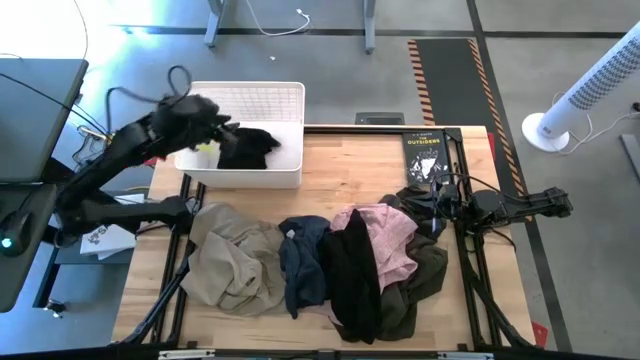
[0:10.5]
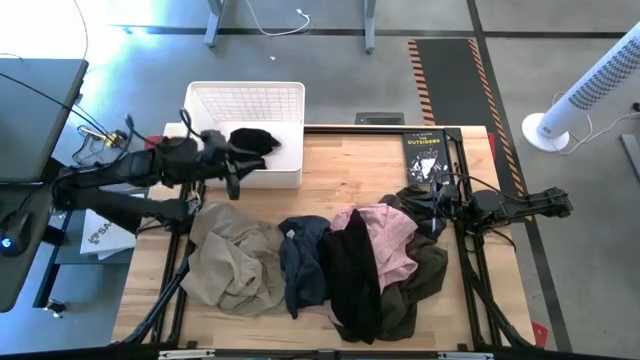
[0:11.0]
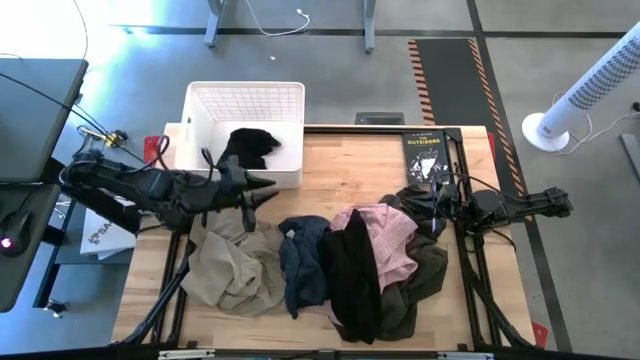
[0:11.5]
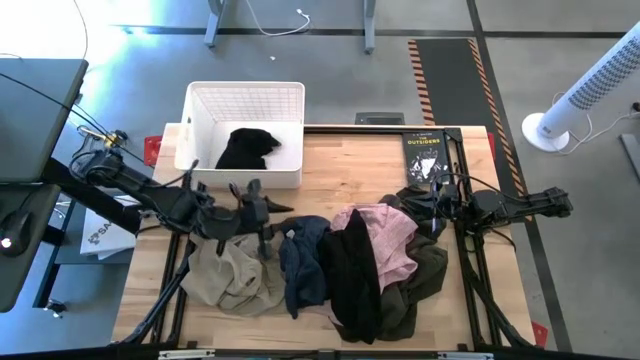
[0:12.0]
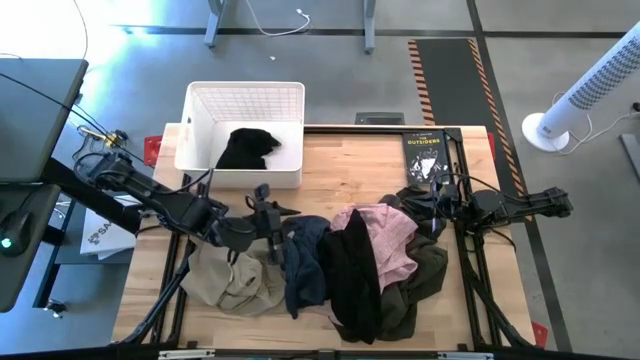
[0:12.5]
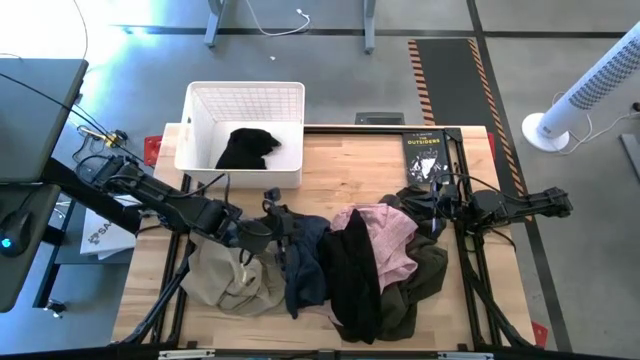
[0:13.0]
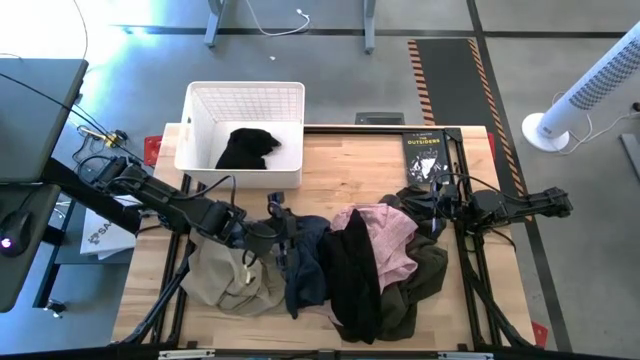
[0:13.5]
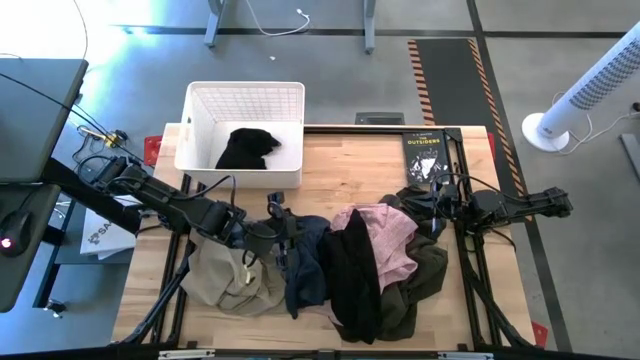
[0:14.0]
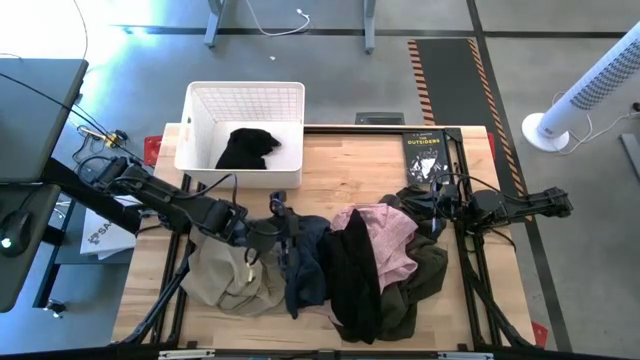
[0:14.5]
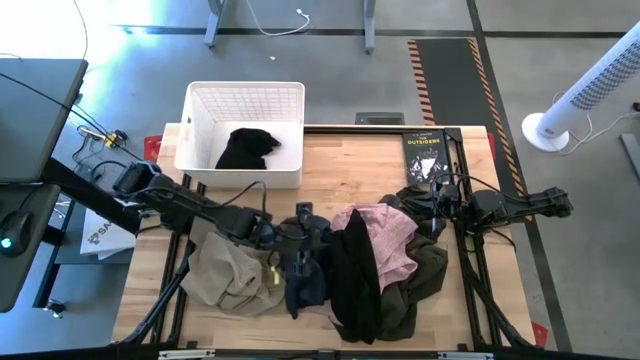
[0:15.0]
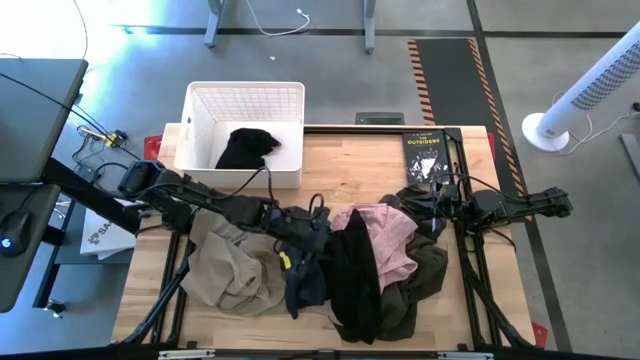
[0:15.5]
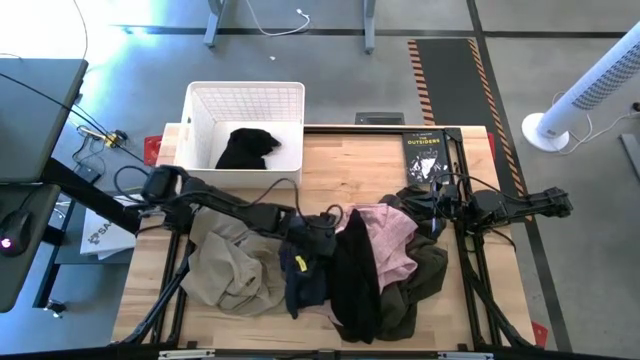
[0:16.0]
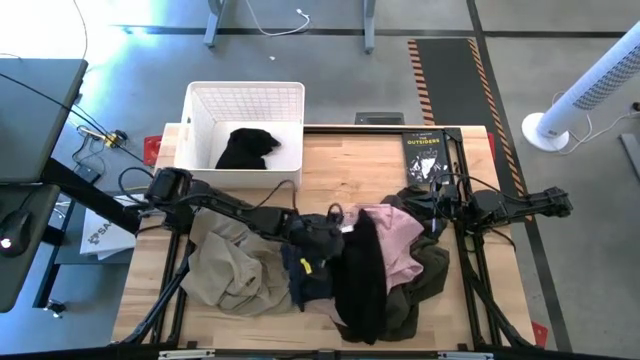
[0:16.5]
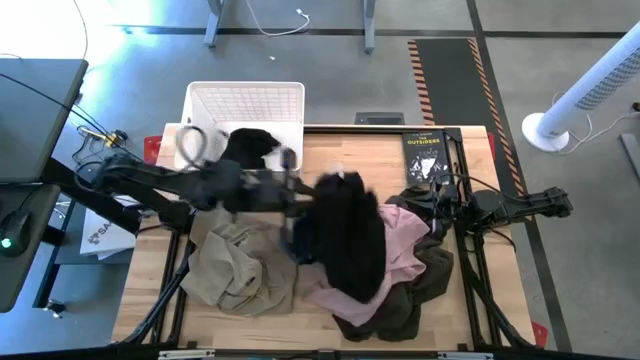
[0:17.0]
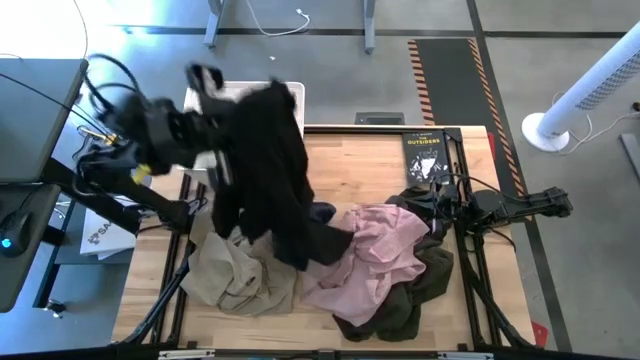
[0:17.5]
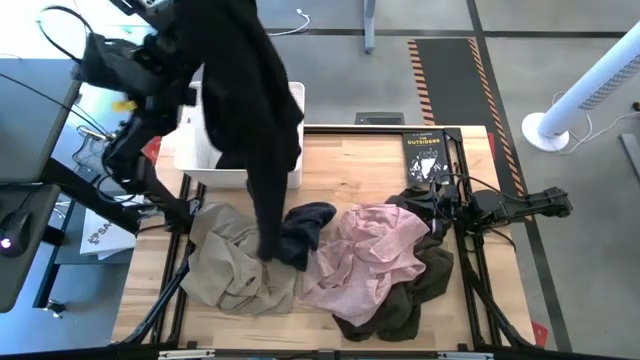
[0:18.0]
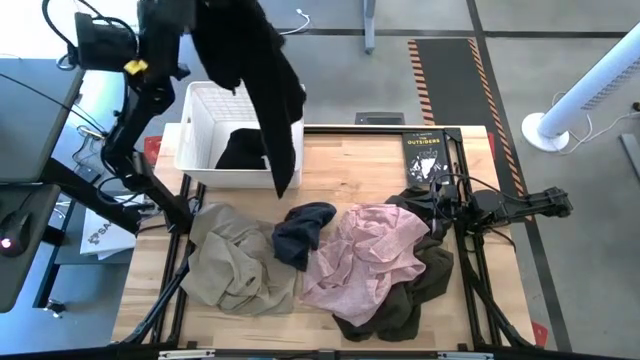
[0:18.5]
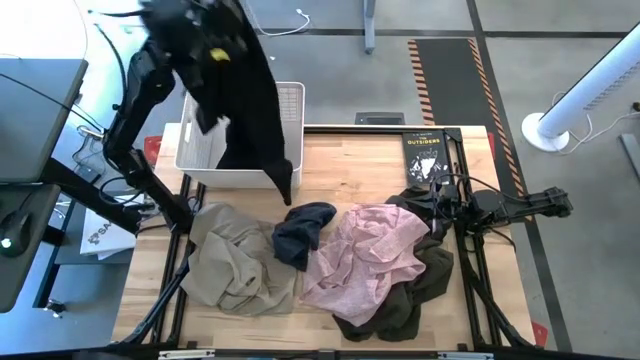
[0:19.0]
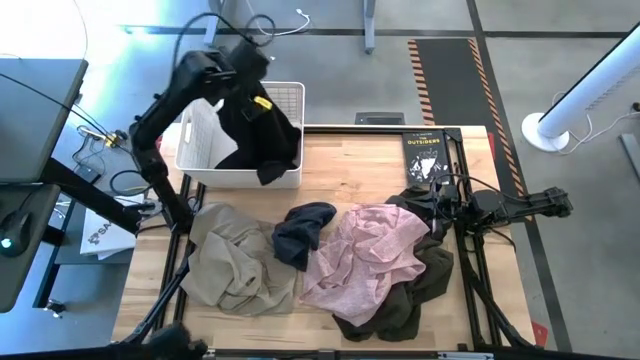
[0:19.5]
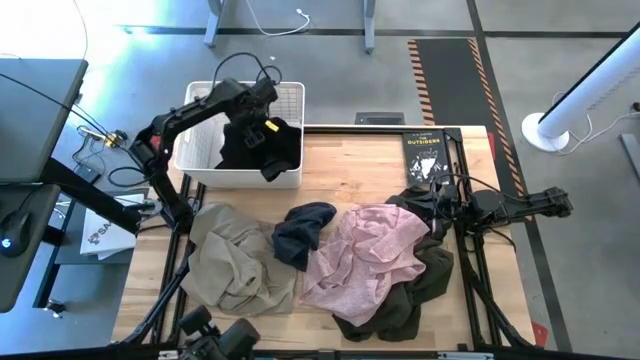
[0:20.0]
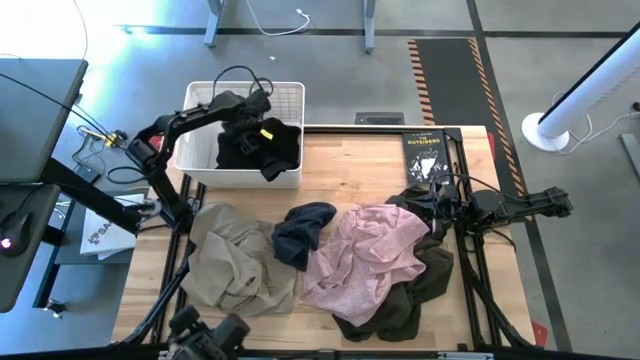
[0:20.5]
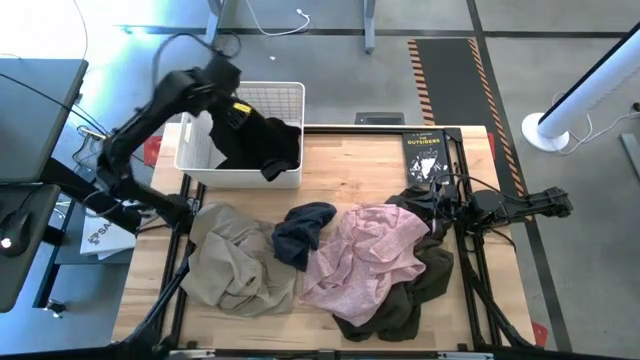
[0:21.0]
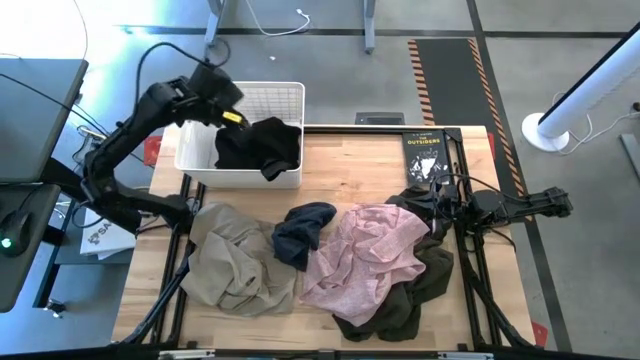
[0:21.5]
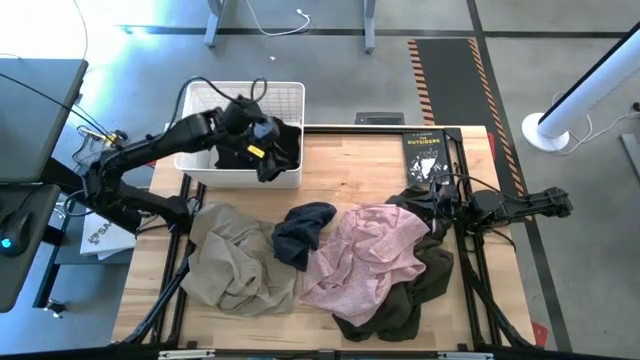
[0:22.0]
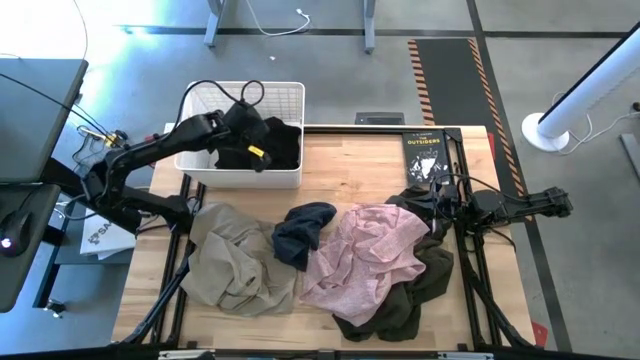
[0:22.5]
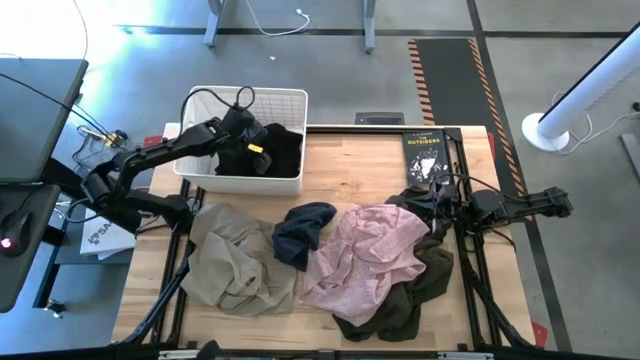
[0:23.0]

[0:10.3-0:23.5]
Task: Sort clothes
Put the black shirt into the laundry bin

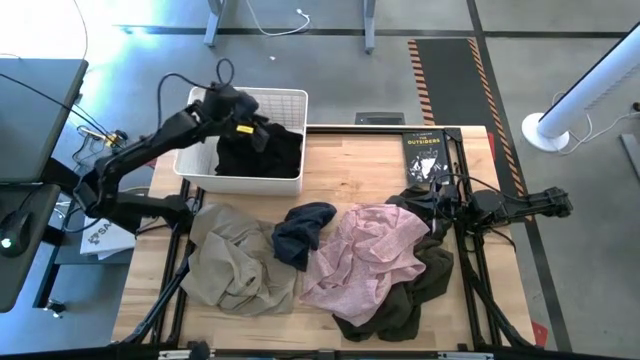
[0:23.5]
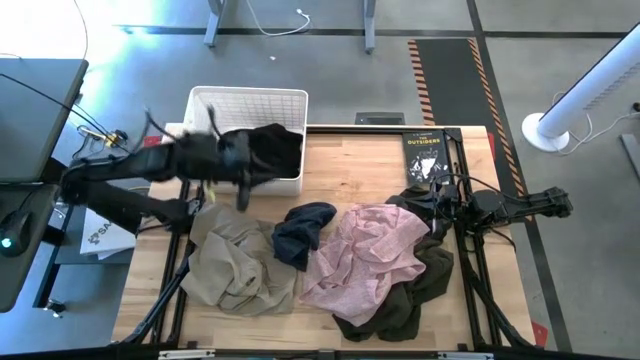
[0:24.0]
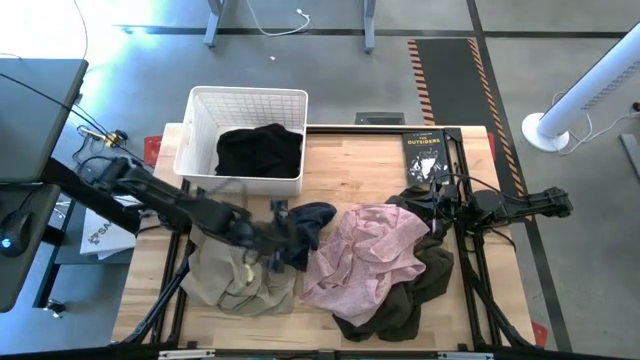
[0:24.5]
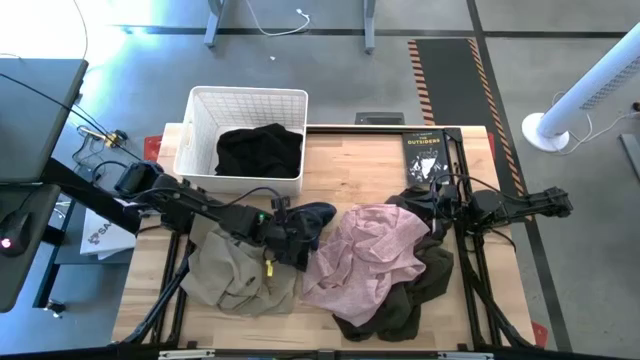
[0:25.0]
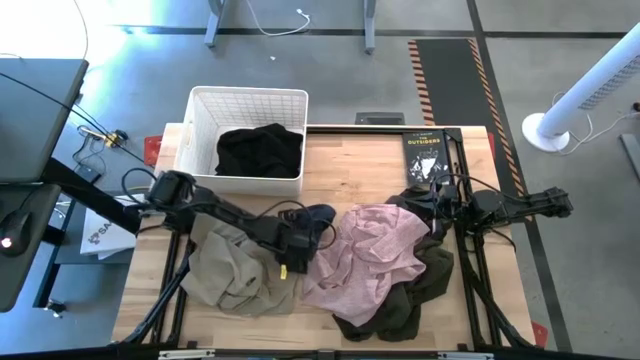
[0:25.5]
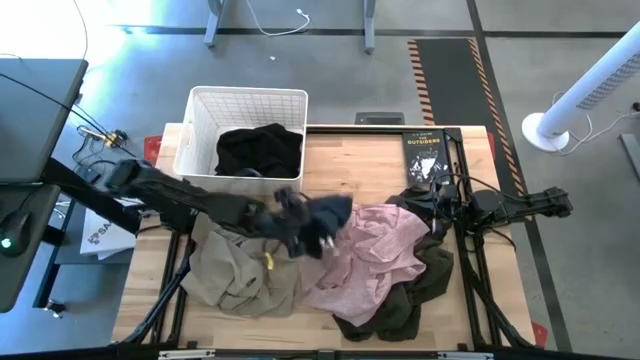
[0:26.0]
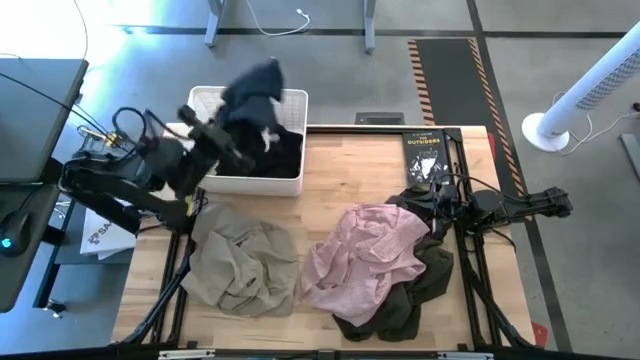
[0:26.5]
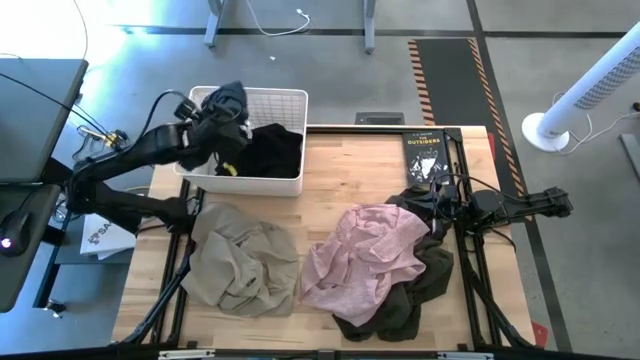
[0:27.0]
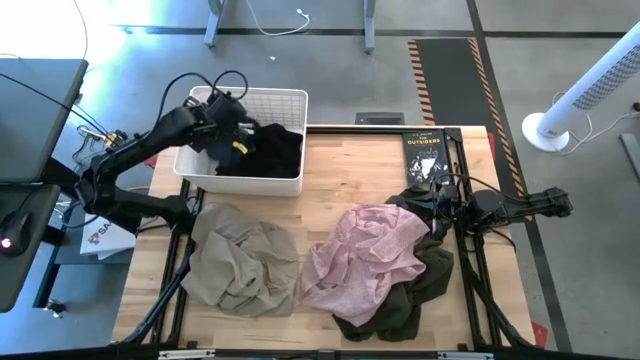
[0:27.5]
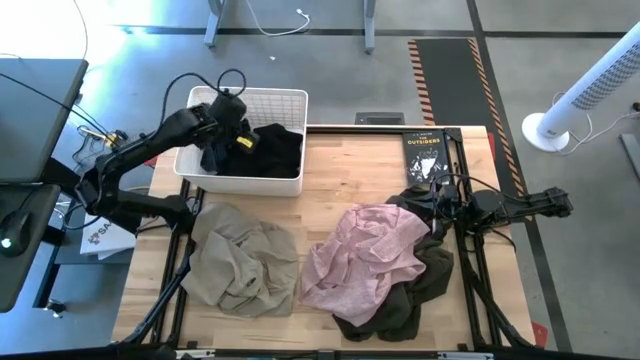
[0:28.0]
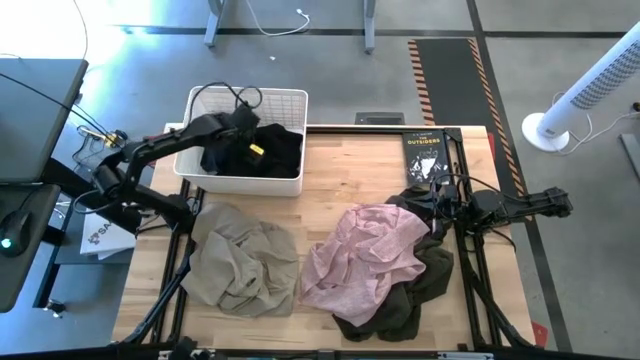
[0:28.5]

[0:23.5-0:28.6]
Put the blue short into the laundry bin

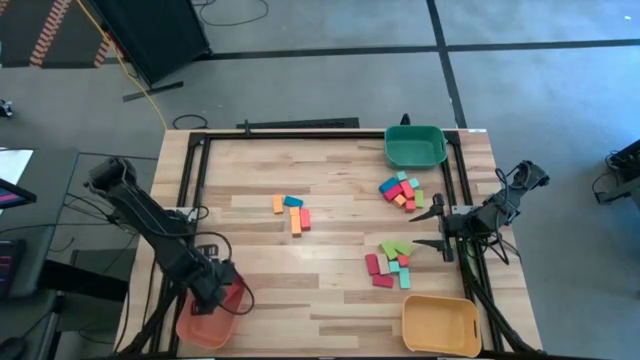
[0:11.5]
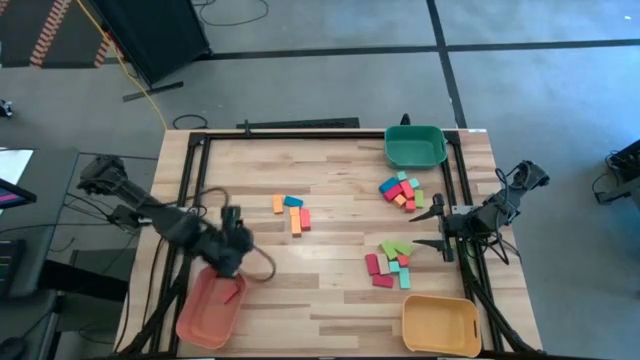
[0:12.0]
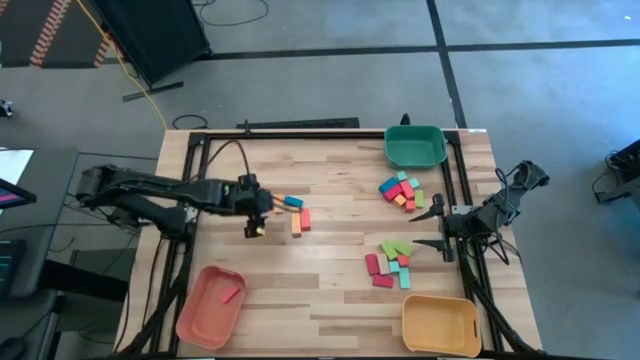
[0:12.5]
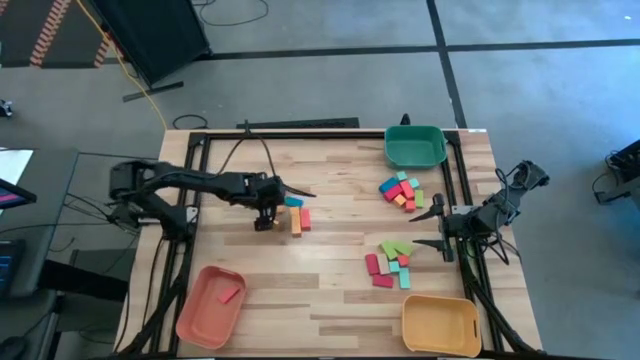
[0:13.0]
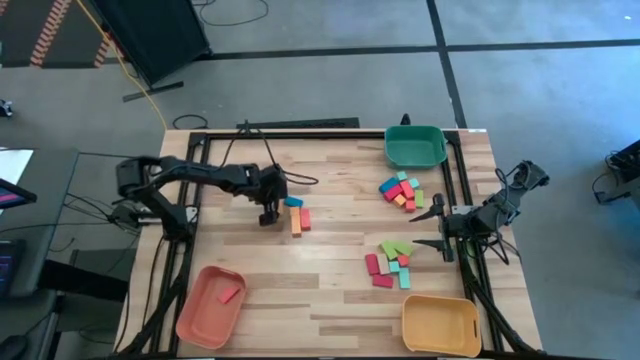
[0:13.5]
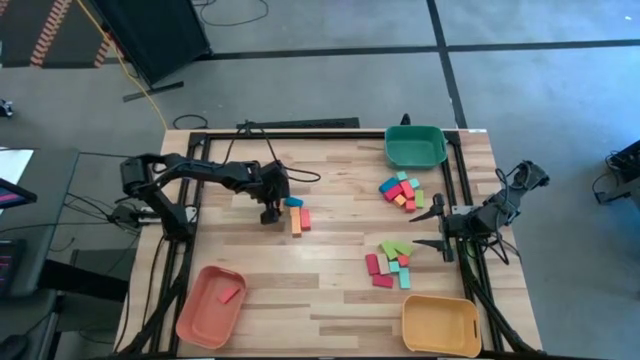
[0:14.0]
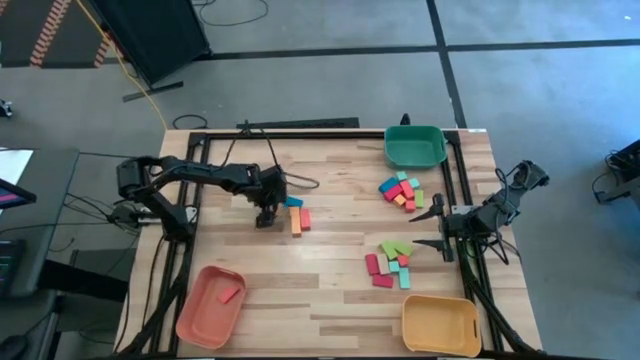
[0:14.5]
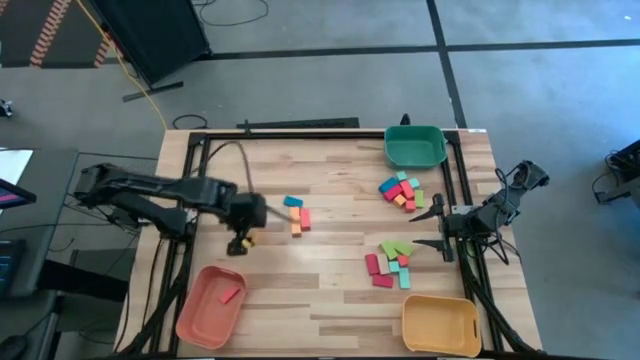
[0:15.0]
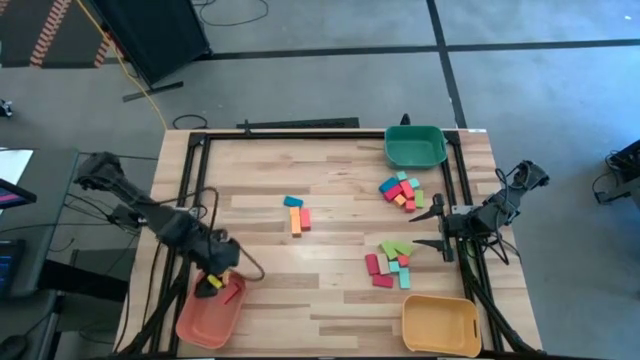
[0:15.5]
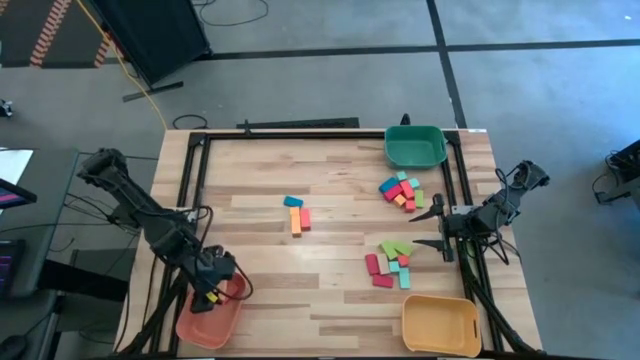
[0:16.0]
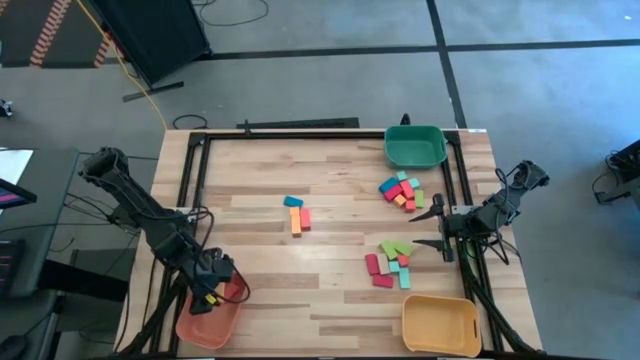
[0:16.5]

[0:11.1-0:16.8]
Task: Sort blocks by size
Put the medium yellow rectangular block into the orange bin
